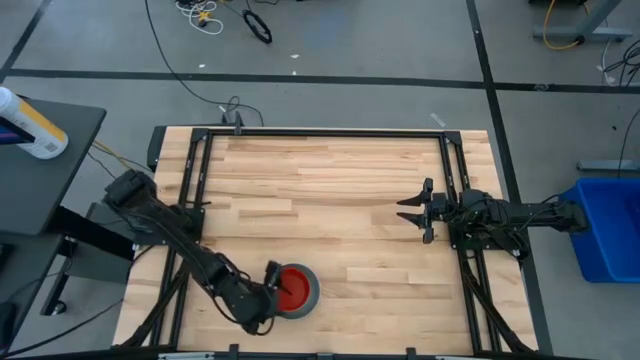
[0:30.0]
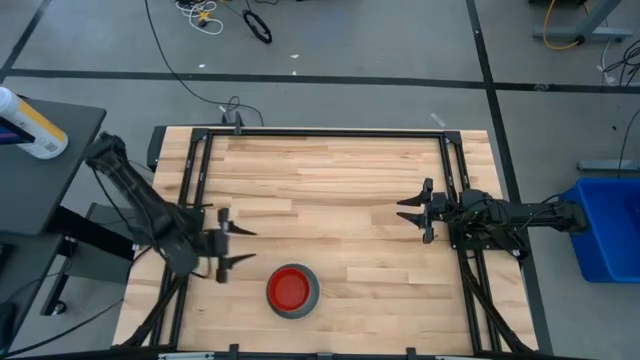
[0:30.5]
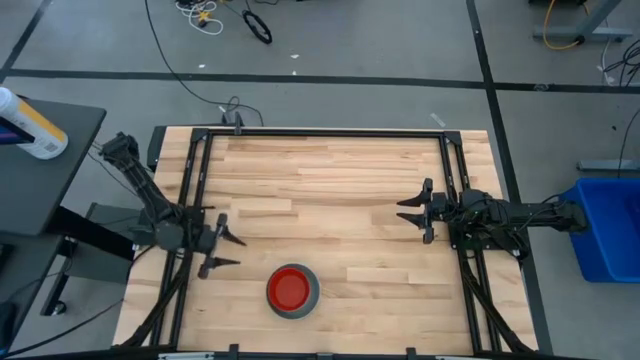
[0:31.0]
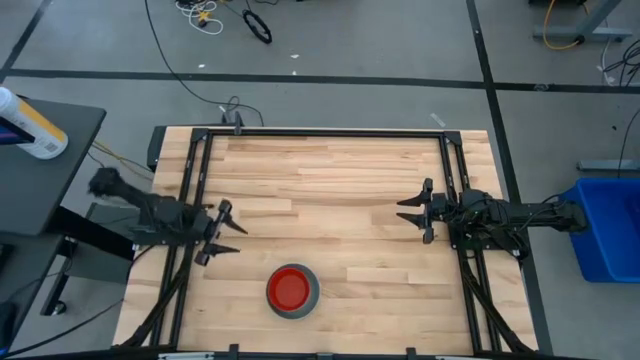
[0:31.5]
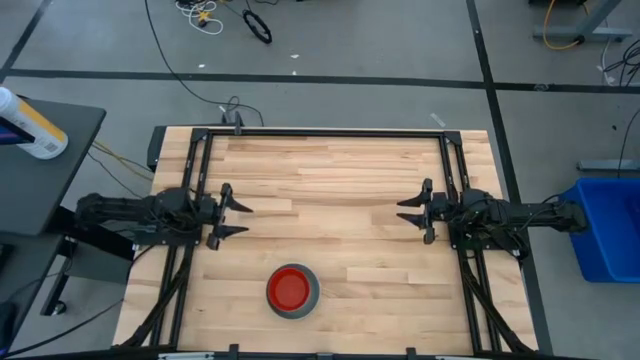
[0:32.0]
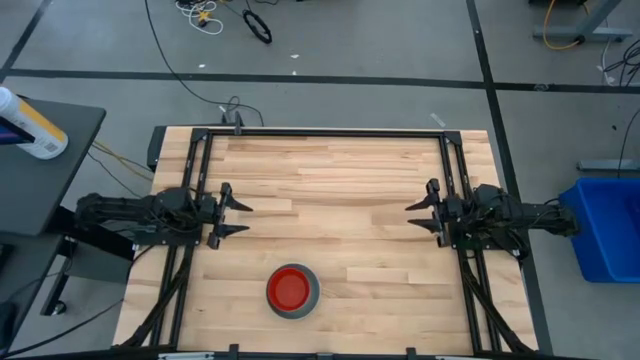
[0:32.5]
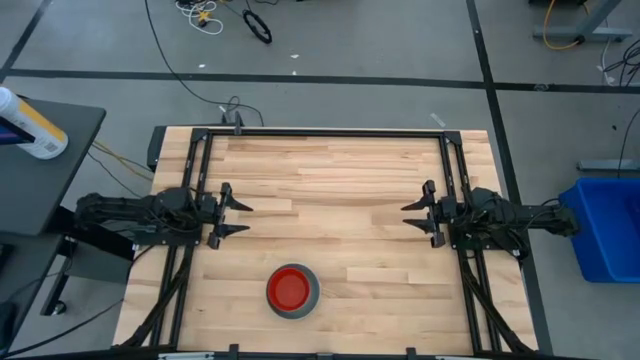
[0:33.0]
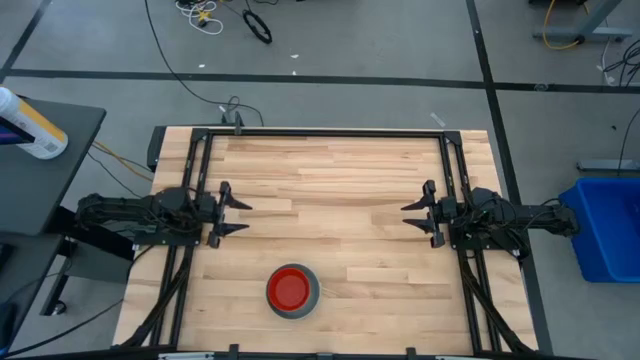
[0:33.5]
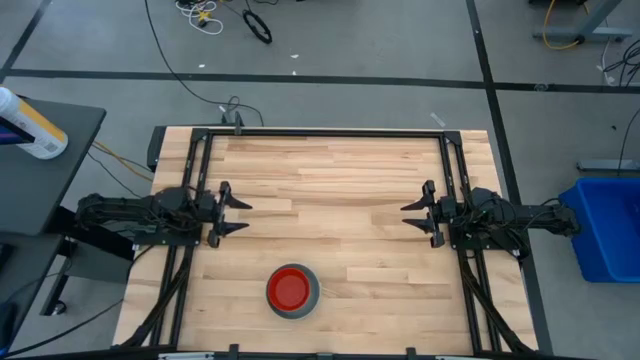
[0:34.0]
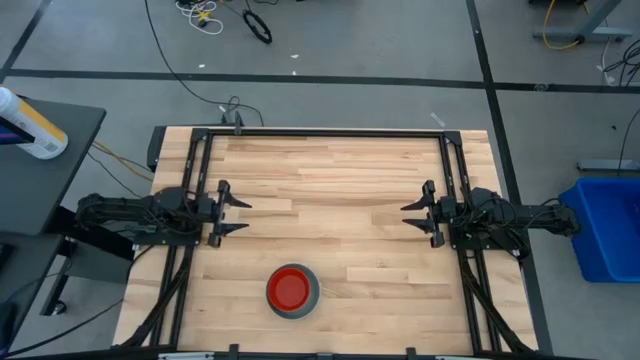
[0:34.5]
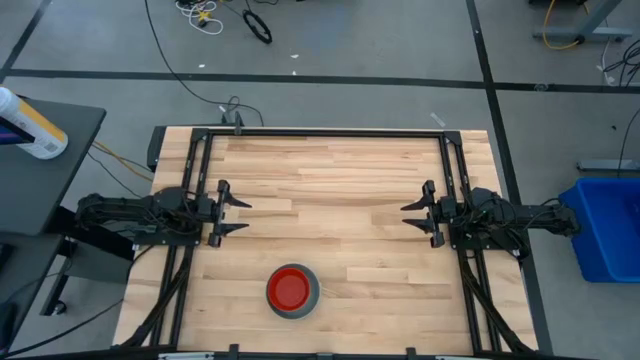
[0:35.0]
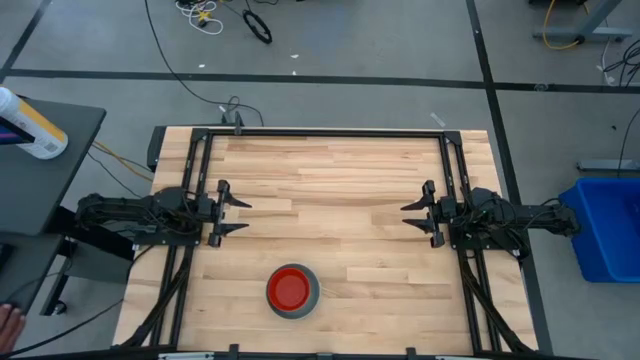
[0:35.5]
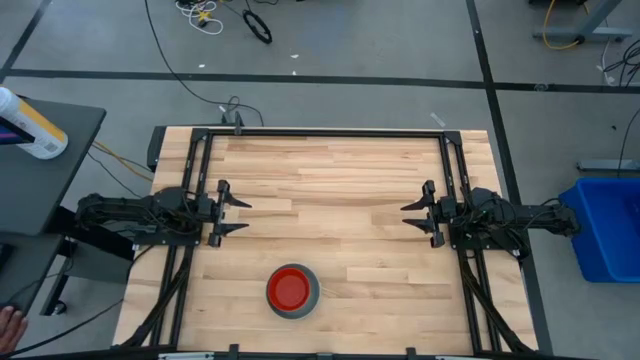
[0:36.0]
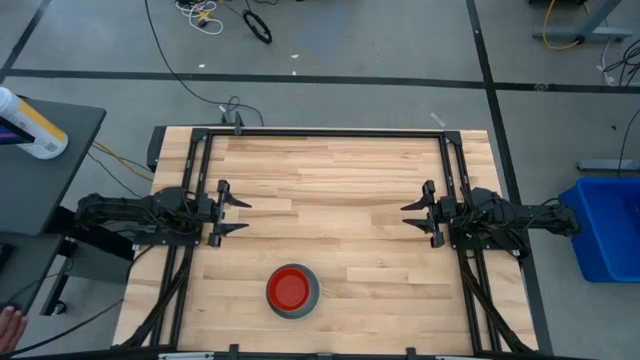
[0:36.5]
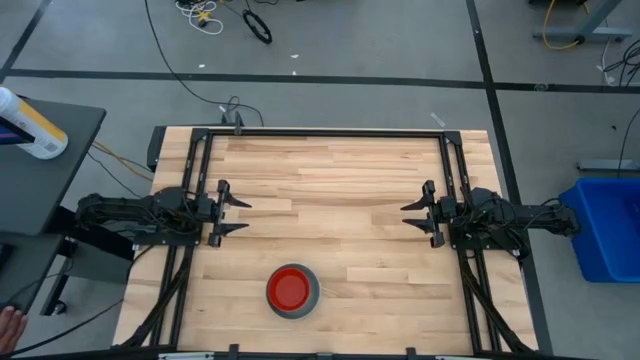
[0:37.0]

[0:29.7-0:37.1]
Return to Home Position
